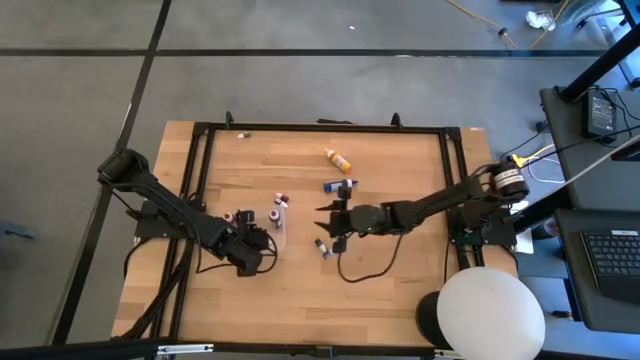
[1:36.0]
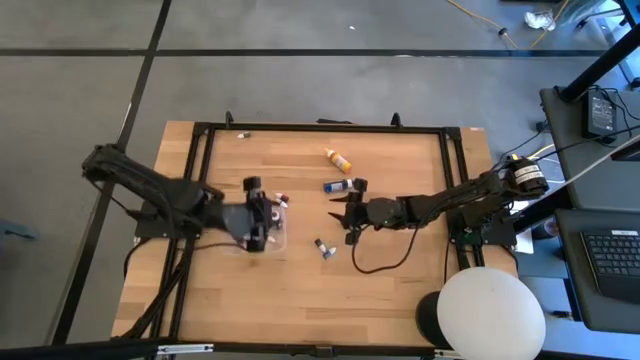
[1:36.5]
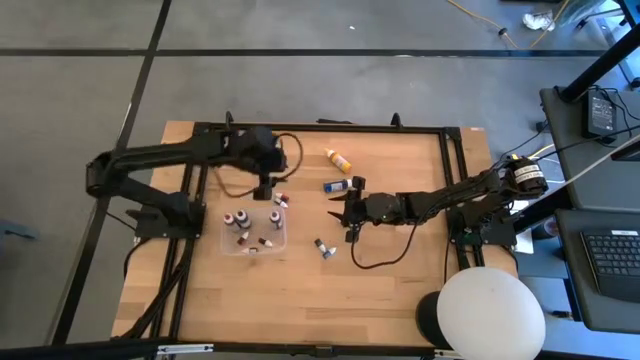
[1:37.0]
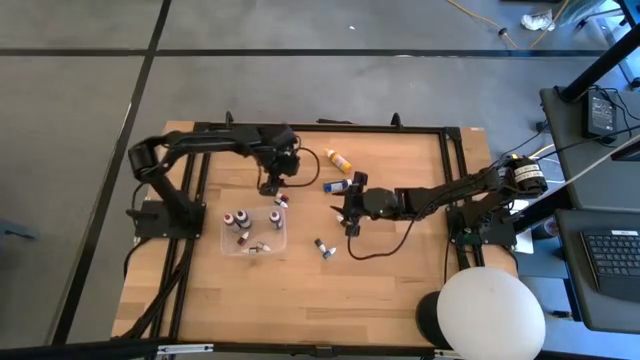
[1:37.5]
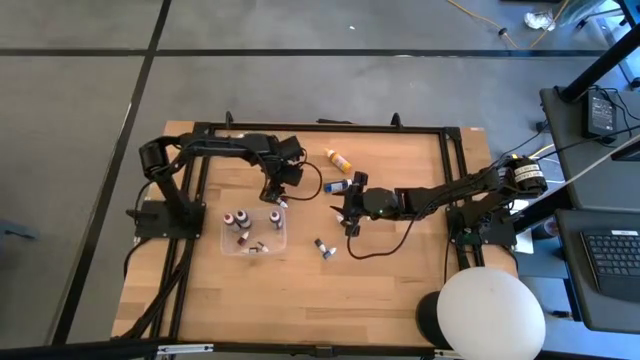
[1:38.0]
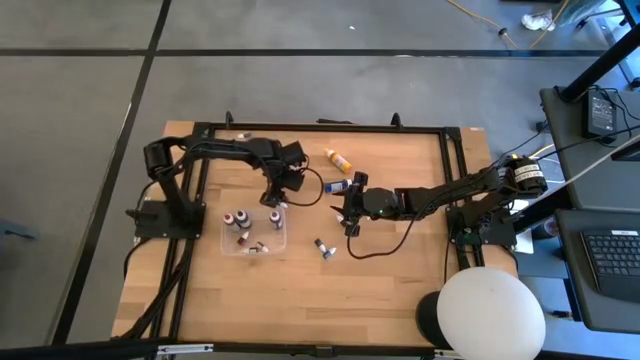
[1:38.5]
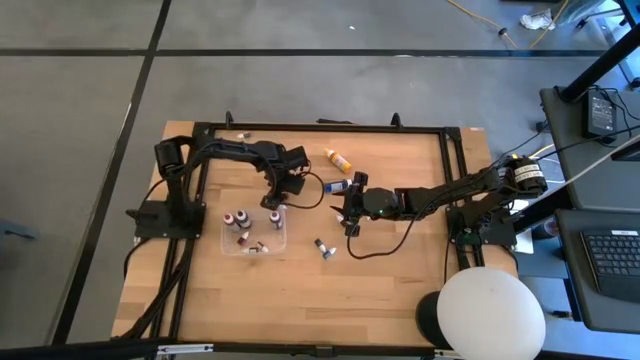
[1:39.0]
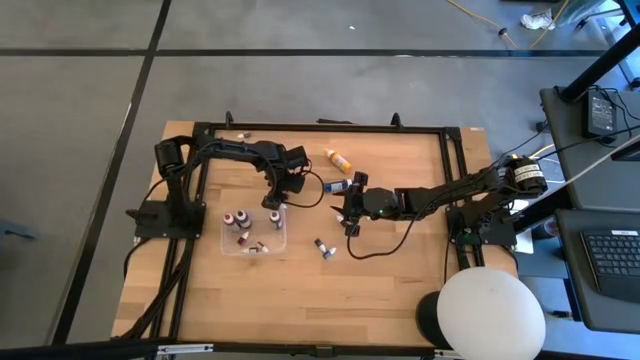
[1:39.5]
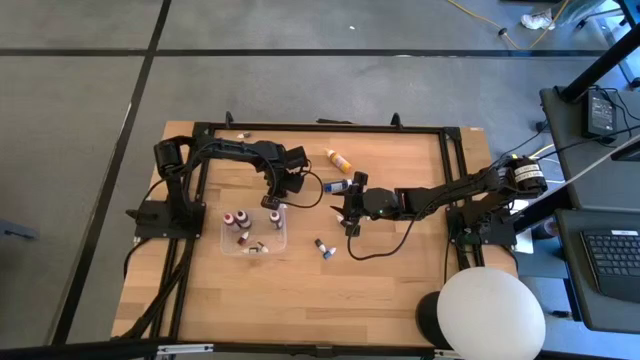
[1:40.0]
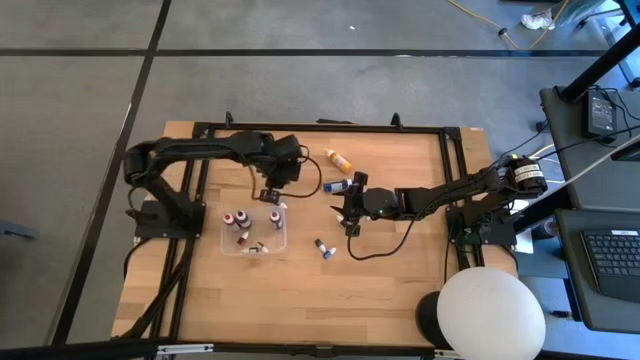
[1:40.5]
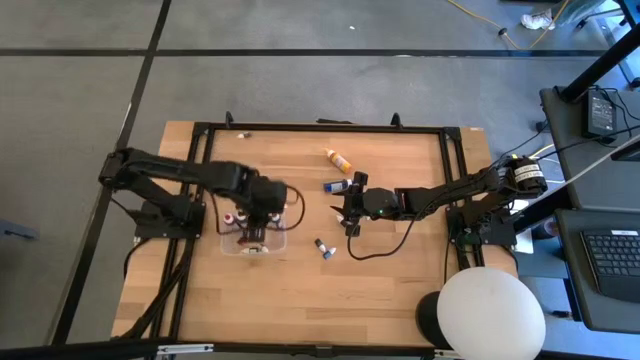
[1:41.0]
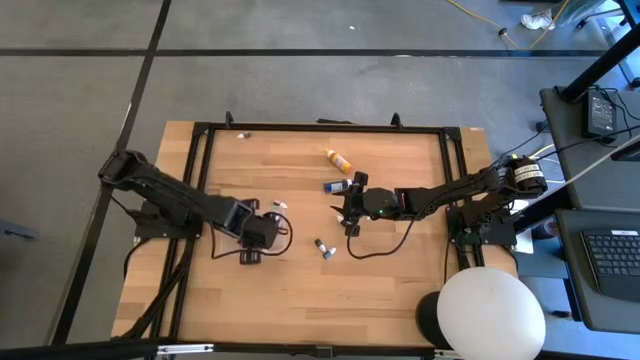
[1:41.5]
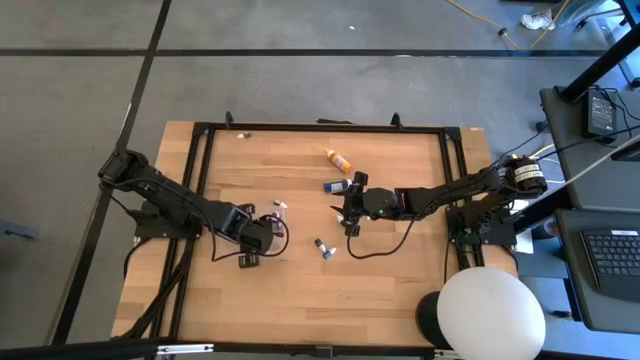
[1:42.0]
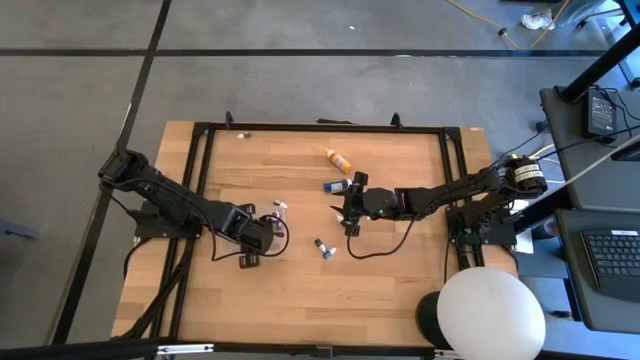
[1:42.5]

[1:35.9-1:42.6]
Task: Pick & Place food coloring
Put the small red food coloring bottle into the transparent bin

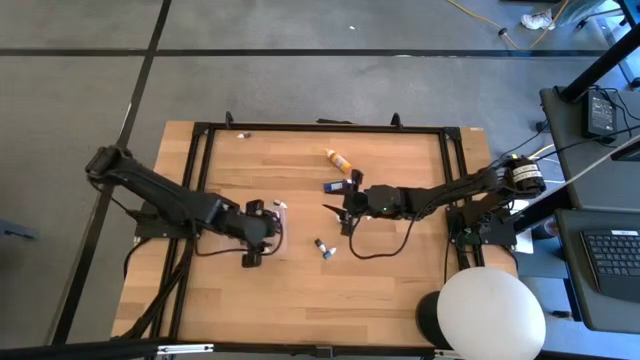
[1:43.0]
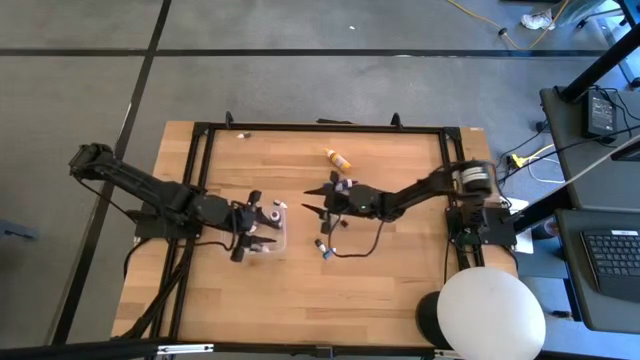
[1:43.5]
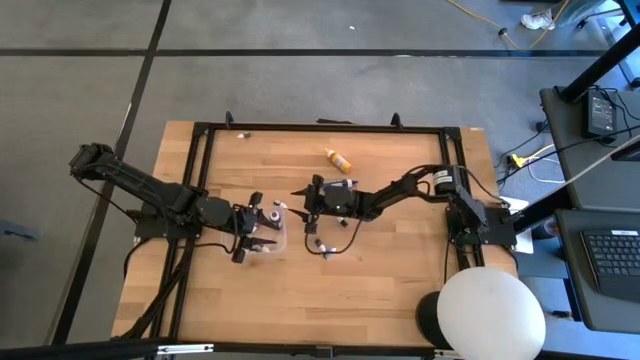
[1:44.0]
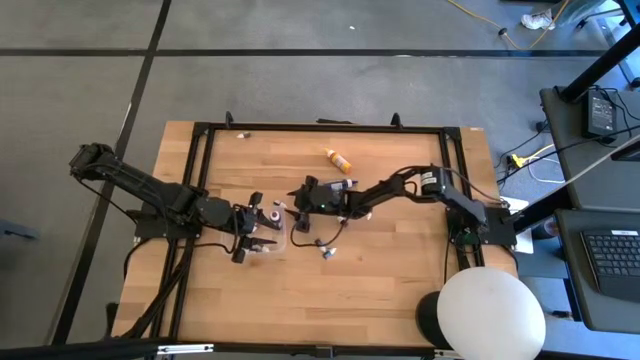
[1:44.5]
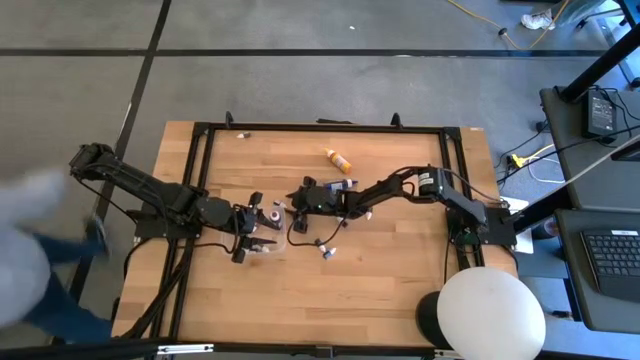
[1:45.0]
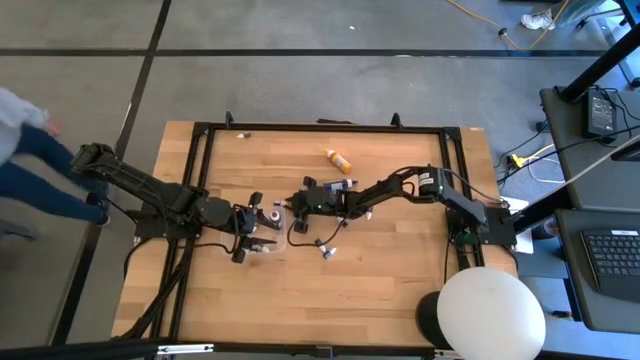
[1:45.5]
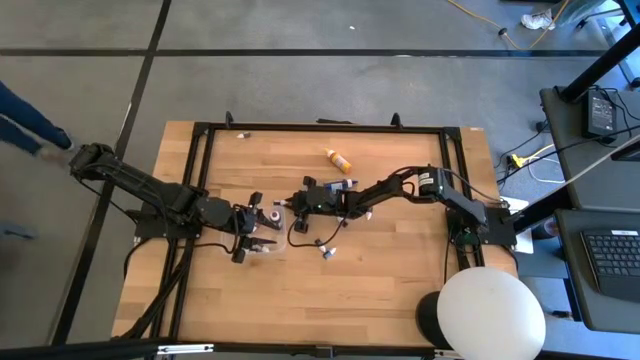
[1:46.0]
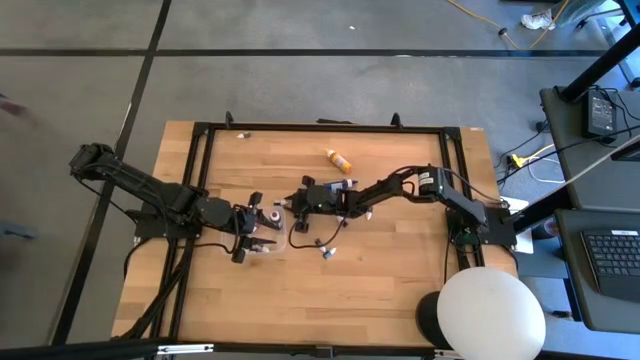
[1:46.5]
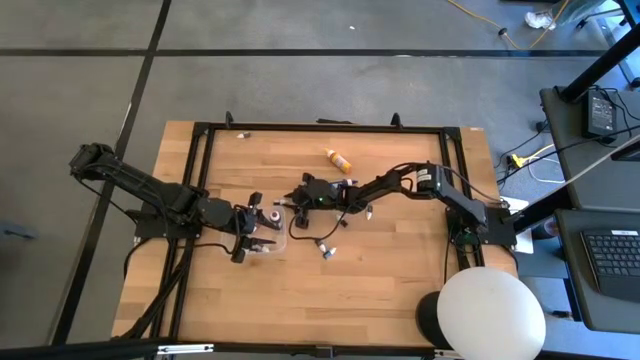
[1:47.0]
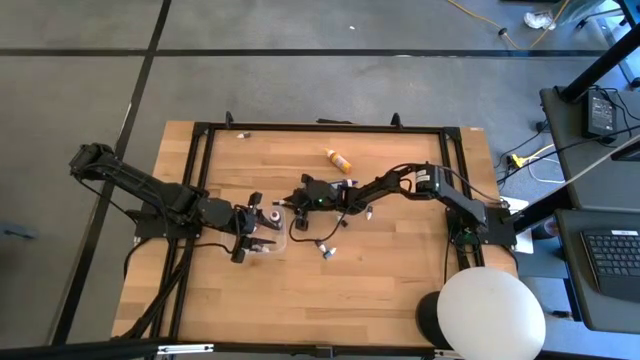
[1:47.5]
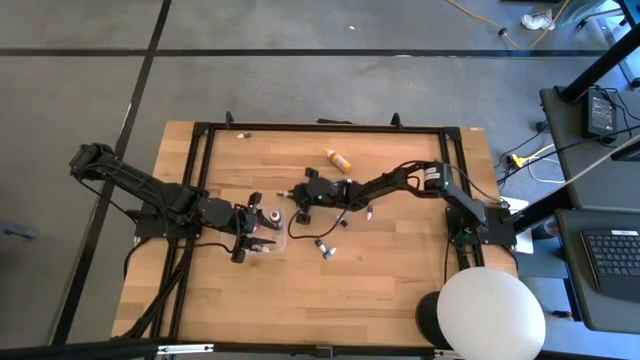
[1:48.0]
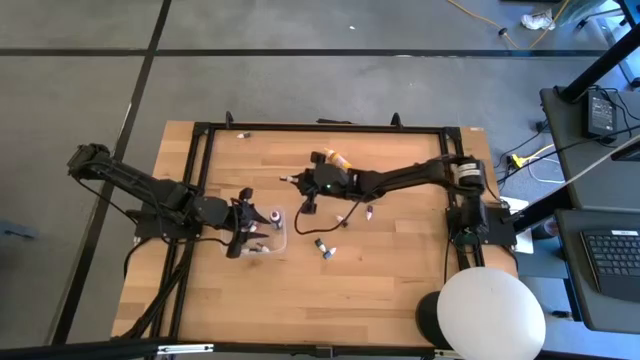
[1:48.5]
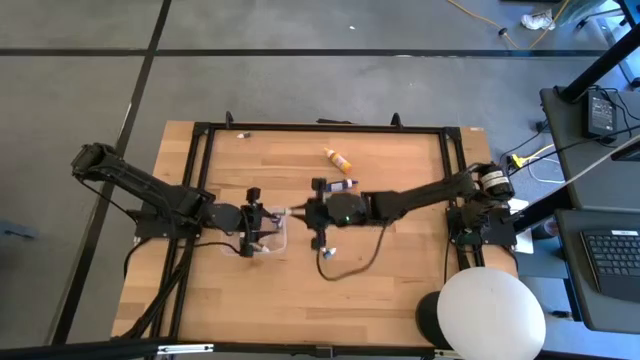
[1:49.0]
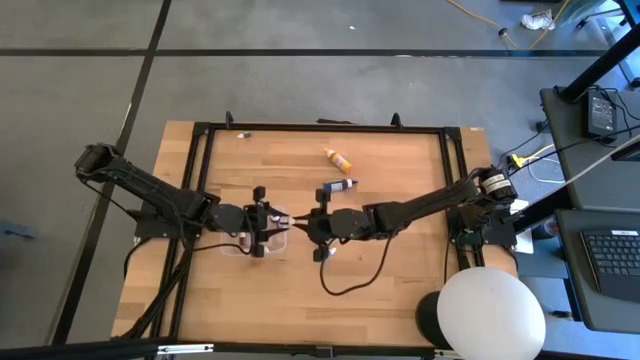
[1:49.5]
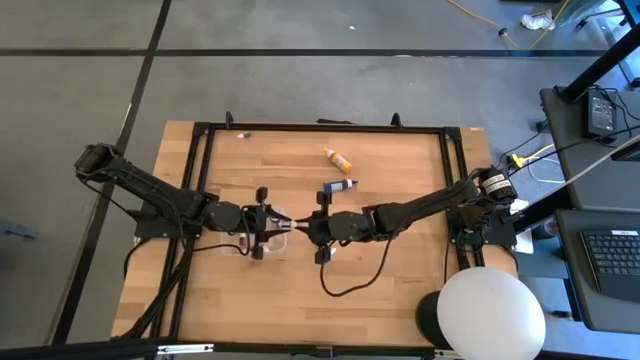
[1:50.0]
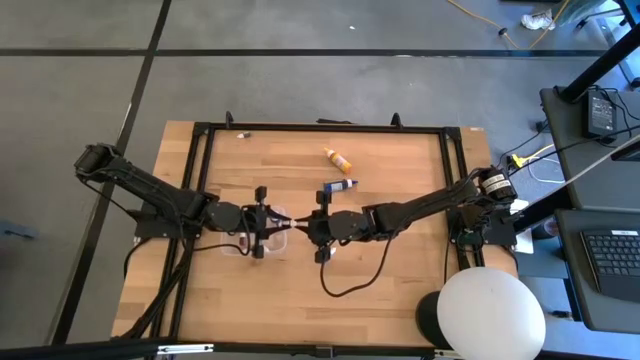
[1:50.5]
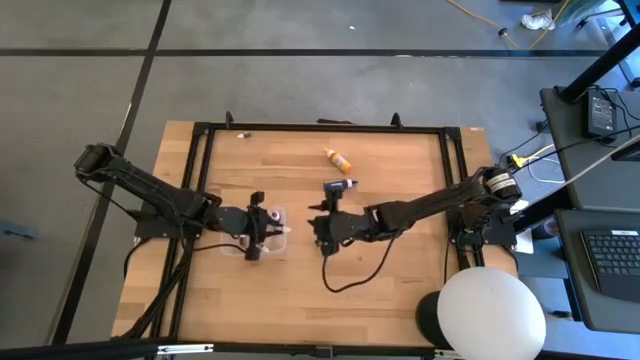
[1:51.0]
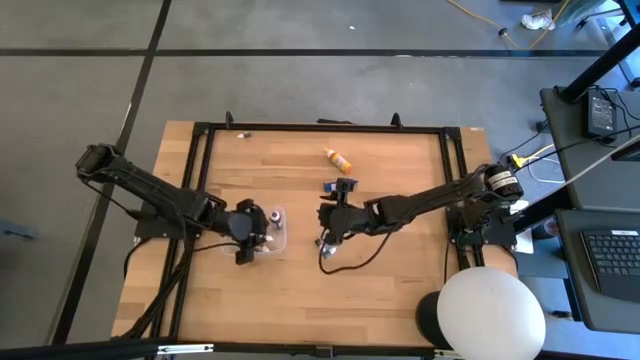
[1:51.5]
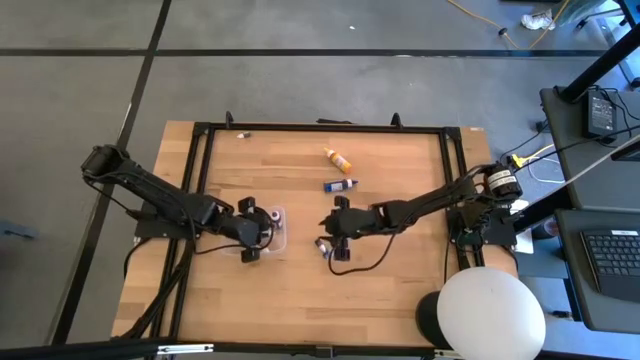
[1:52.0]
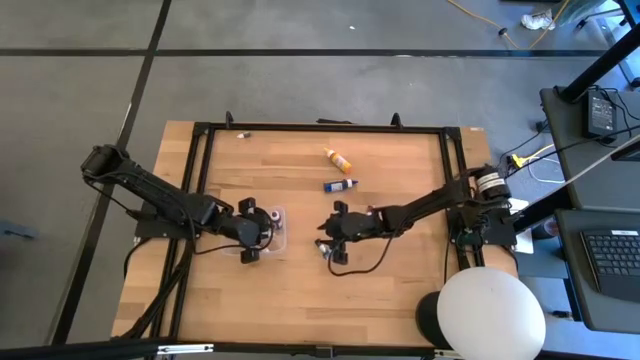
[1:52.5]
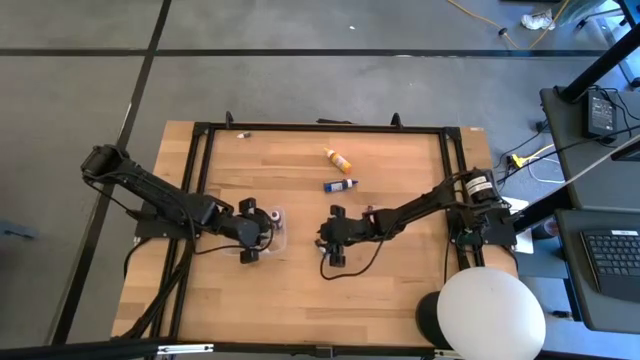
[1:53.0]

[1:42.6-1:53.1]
Put the small pink food coloring bottle into the transparent bin

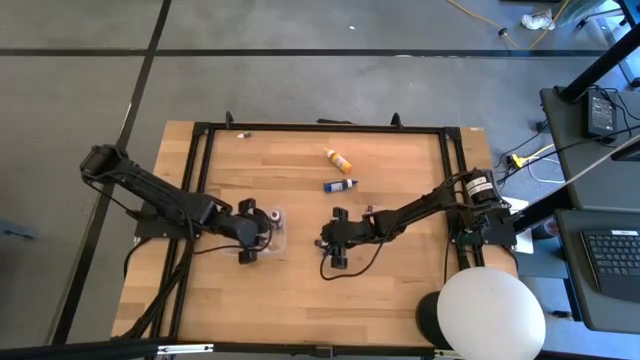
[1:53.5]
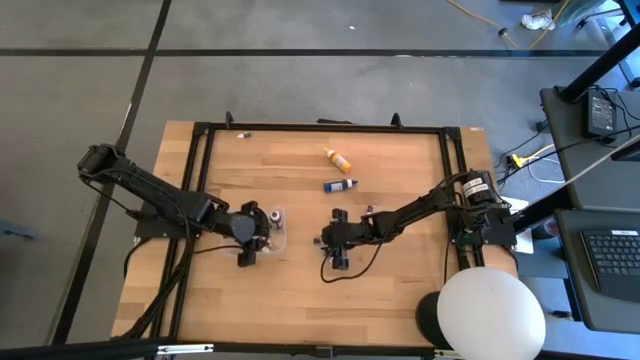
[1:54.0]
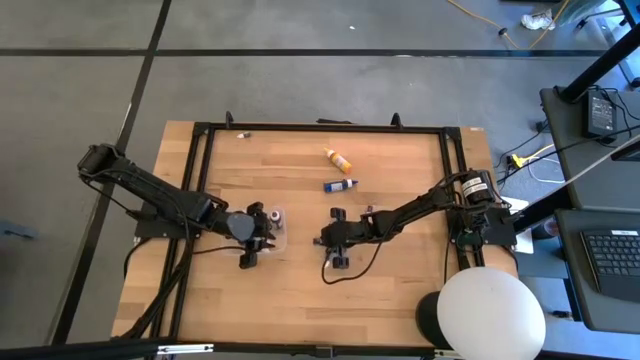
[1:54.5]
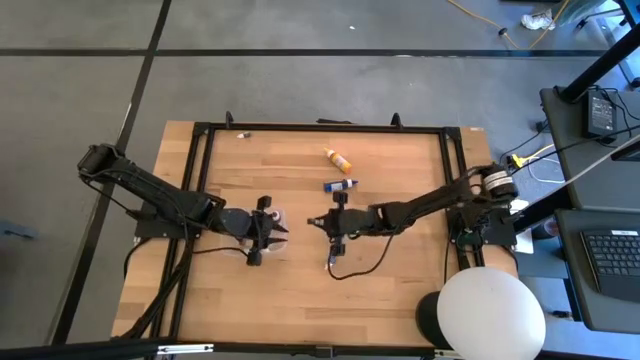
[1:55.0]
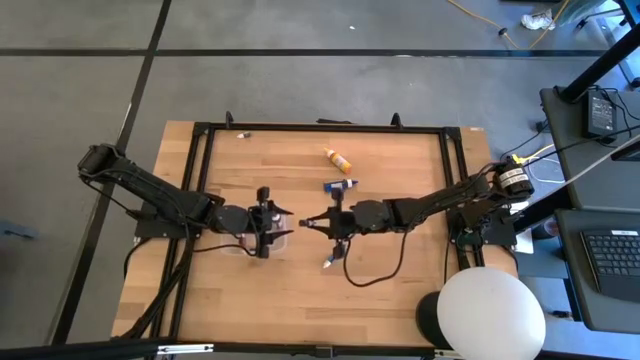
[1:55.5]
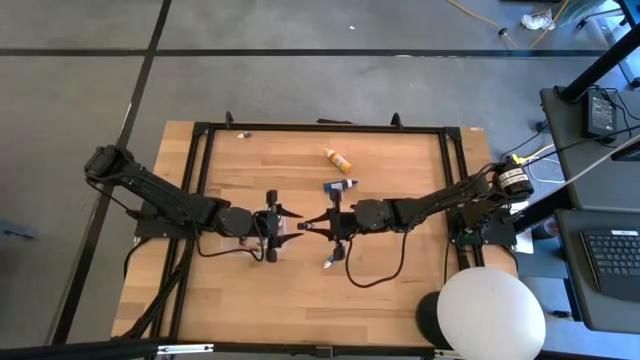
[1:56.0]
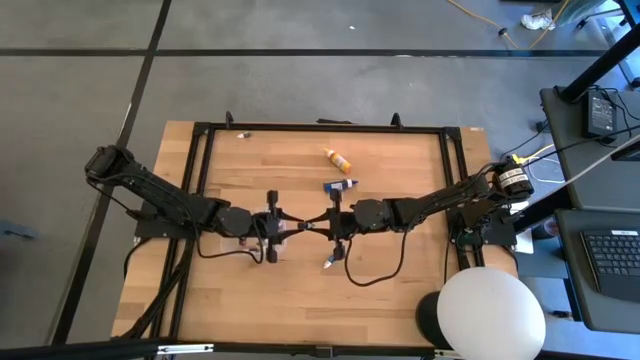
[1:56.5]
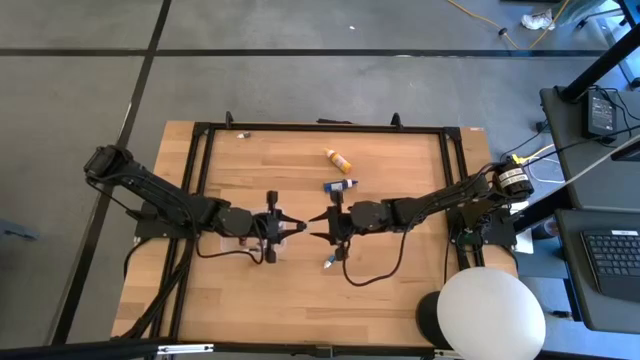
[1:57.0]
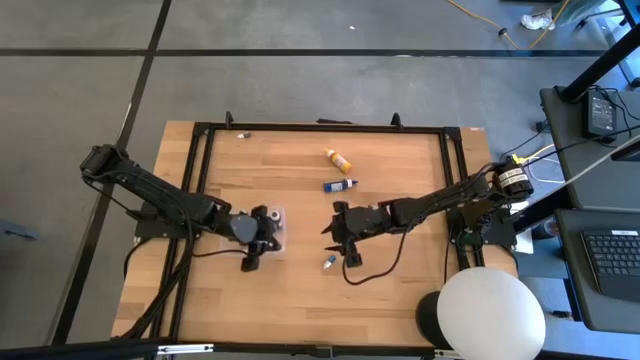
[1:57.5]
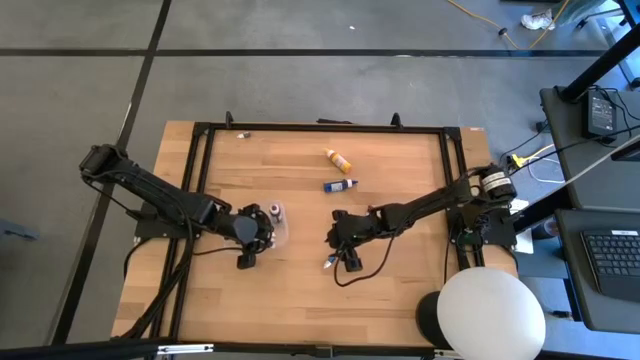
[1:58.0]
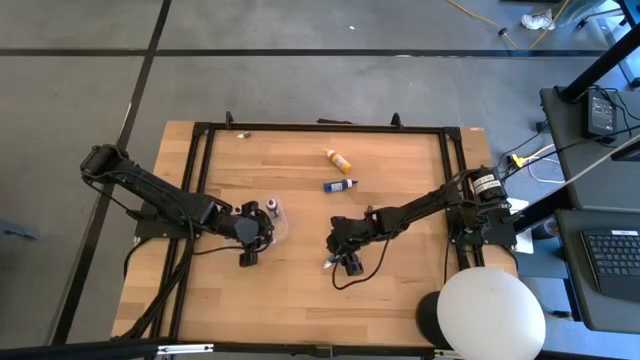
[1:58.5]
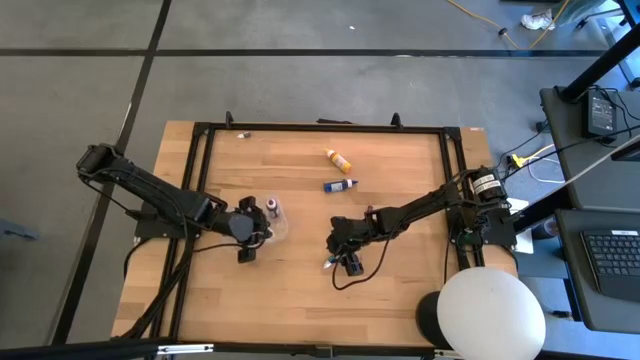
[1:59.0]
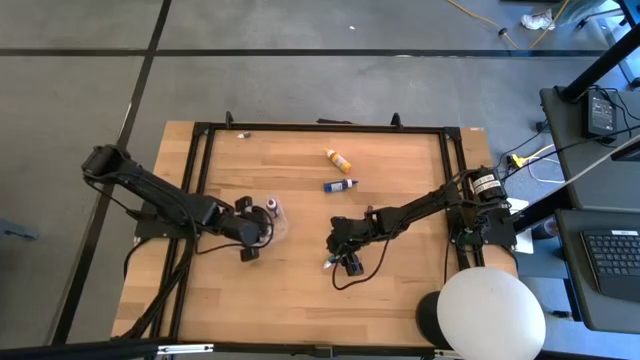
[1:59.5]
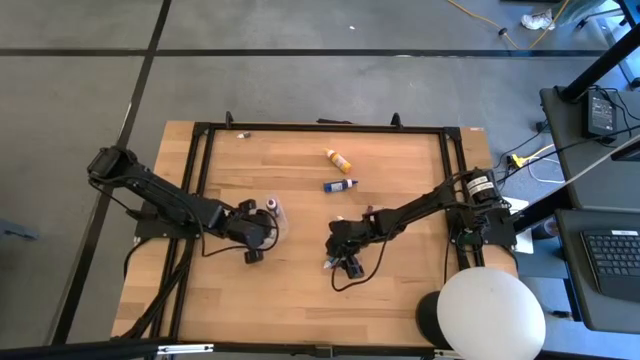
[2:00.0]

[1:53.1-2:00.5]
Put the top small blue food coloring bottle into the transparent bin
